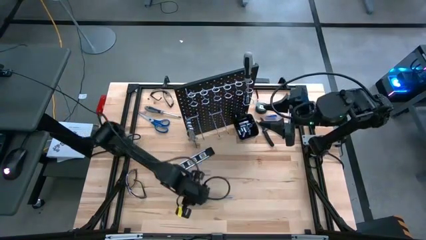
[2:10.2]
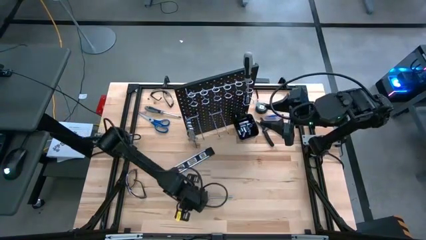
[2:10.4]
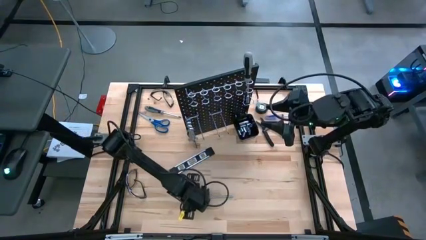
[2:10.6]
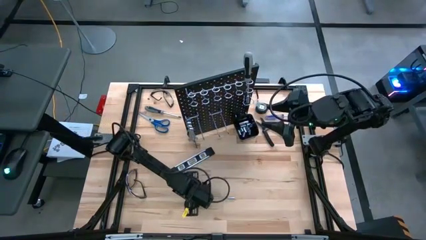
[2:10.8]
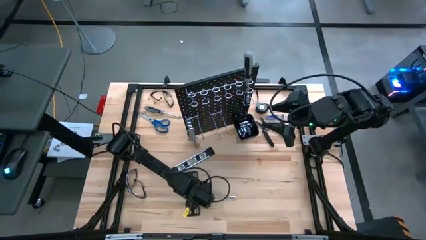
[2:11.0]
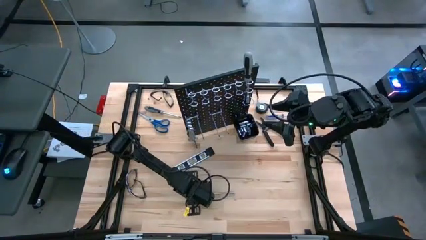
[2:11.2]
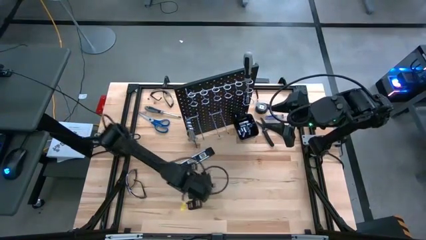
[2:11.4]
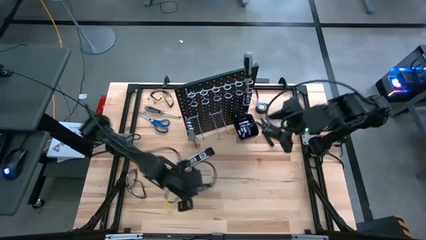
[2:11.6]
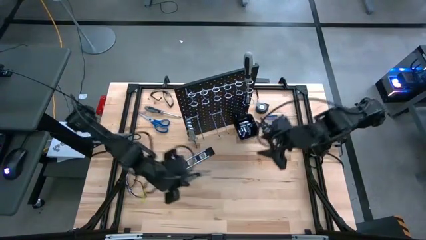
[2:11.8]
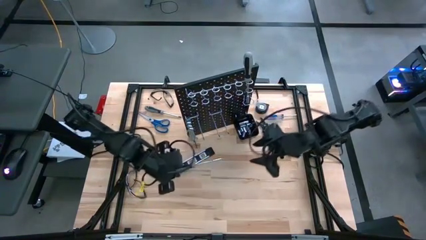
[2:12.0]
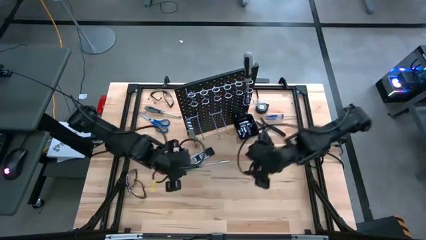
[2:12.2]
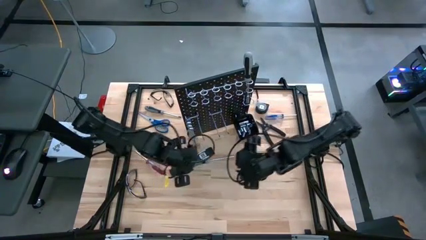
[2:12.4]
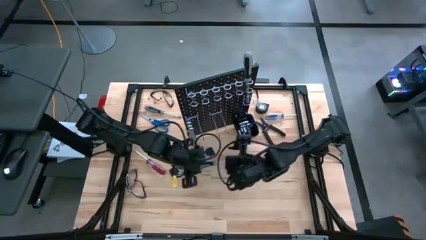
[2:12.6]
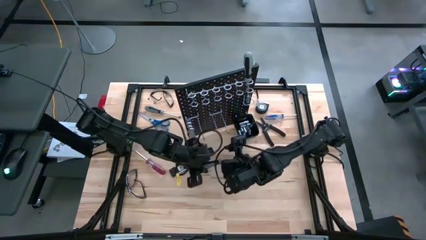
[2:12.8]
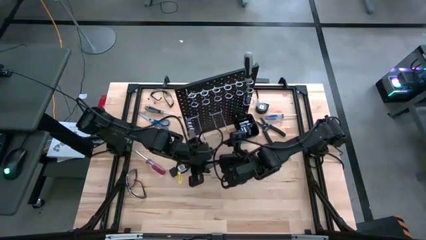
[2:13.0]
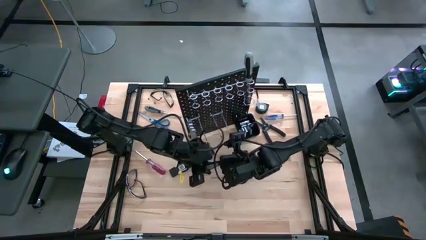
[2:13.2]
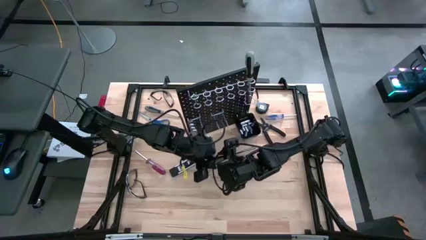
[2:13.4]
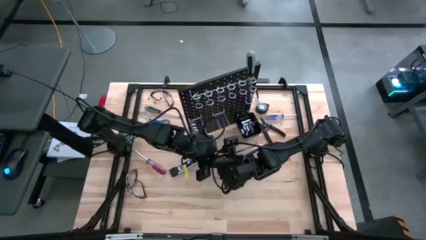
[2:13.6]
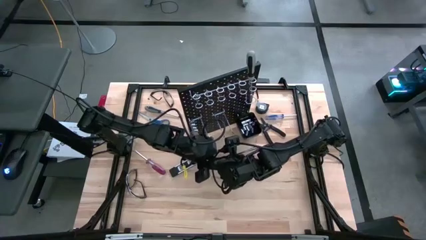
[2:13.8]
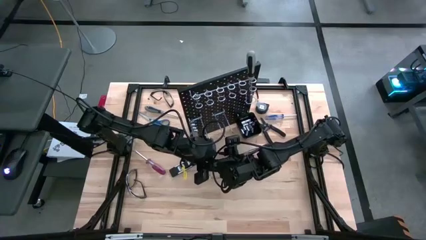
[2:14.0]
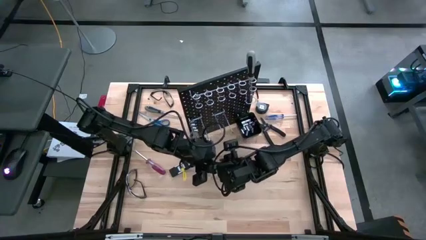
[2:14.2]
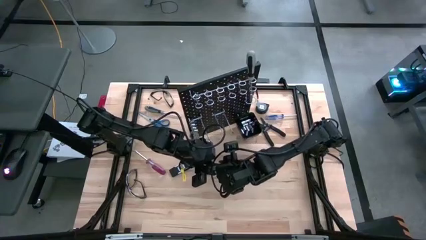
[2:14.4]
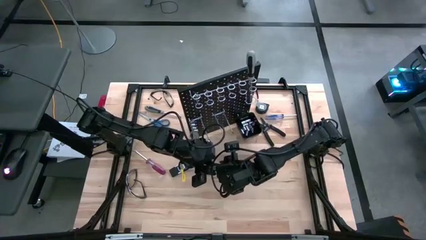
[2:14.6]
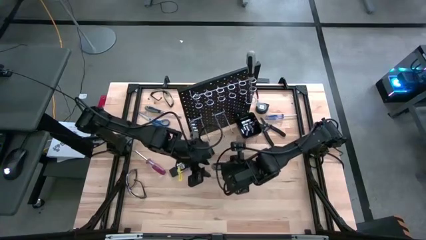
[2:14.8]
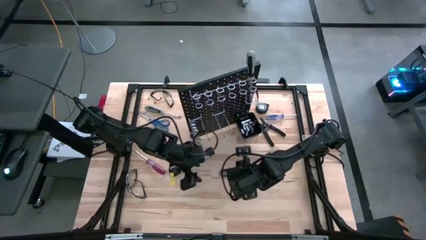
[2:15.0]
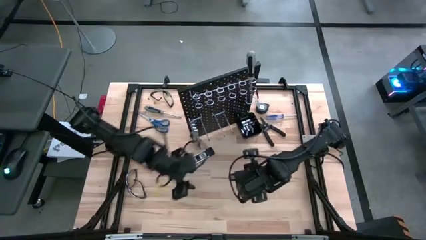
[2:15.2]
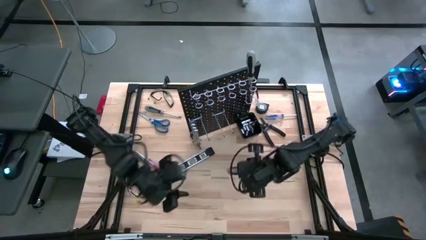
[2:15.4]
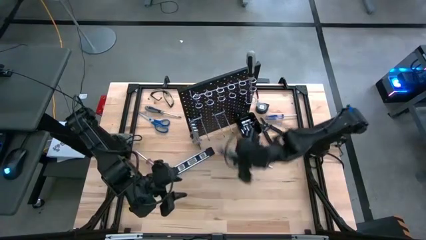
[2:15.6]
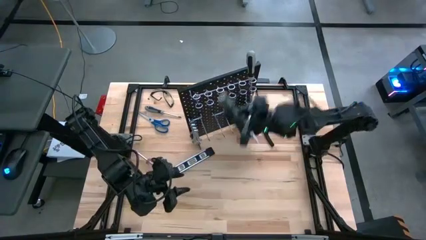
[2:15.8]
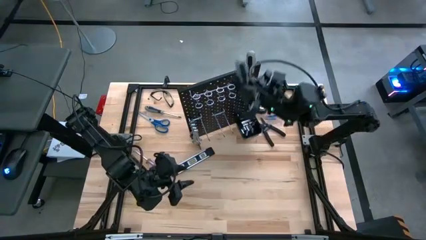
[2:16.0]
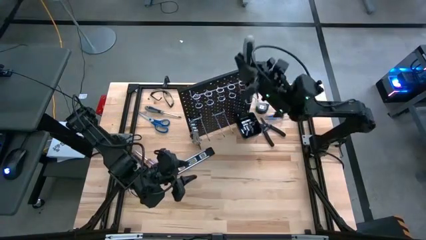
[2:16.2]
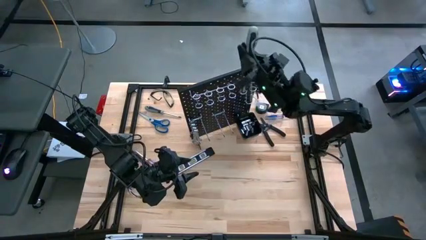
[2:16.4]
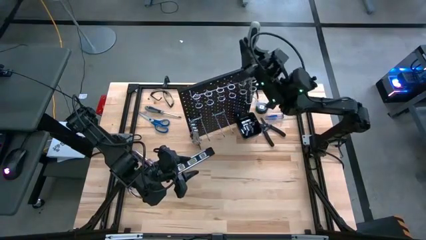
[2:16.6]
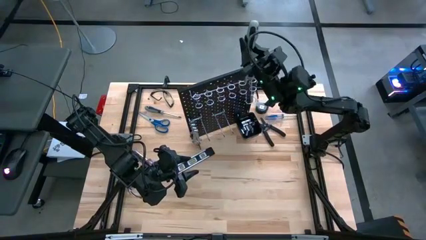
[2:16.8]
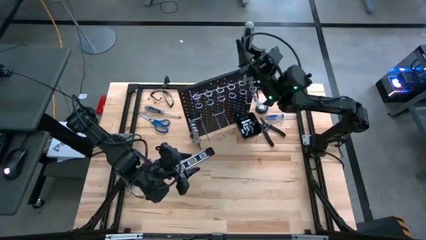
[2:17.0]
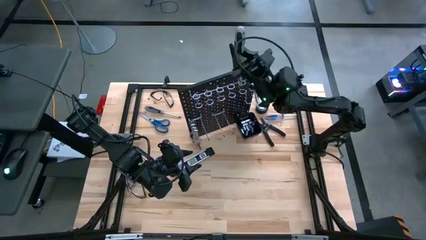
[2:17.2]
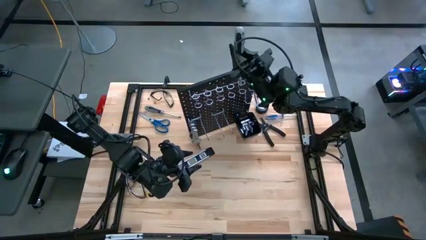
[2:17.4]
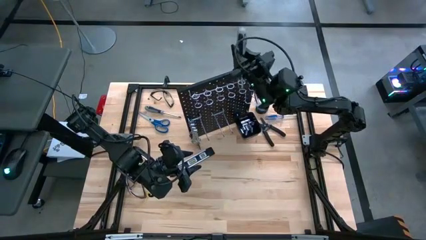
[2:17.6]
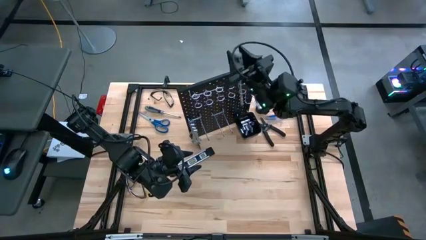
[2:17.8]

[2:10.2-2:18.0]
Task: Hang tools onto peg board
Hang the gray screwdriver on the pegboard

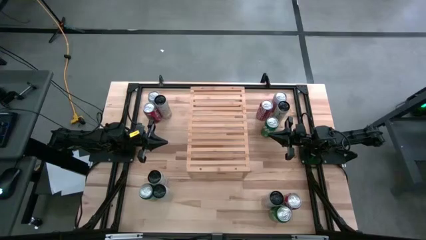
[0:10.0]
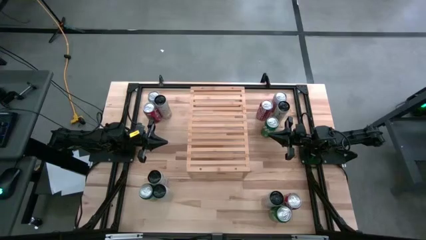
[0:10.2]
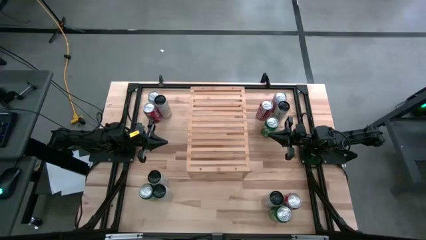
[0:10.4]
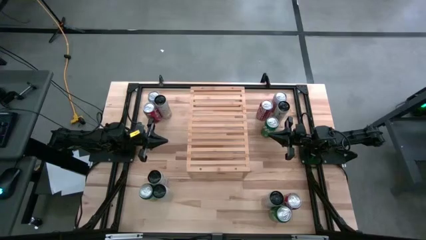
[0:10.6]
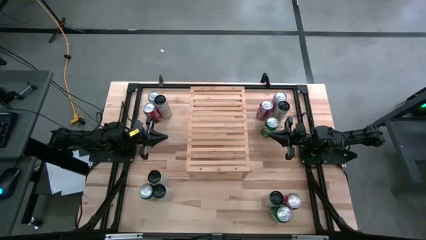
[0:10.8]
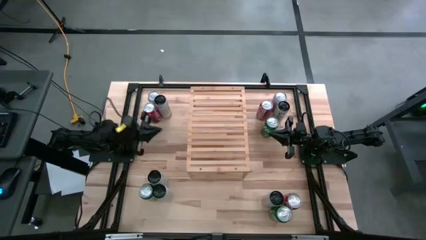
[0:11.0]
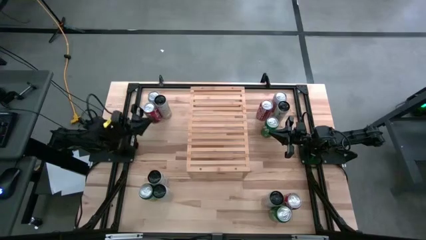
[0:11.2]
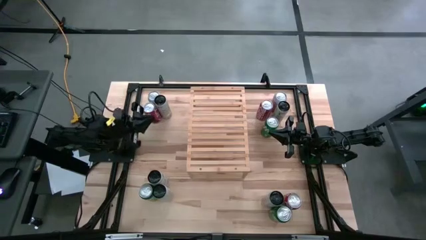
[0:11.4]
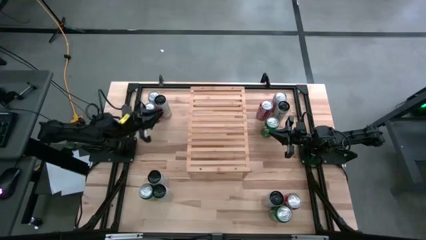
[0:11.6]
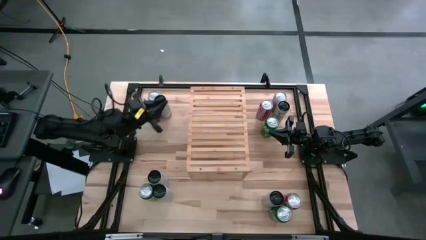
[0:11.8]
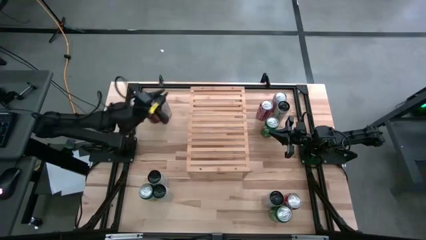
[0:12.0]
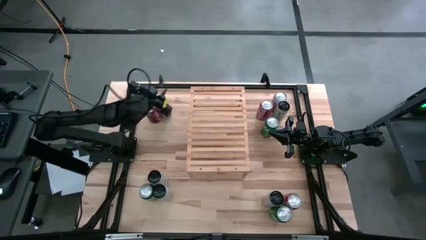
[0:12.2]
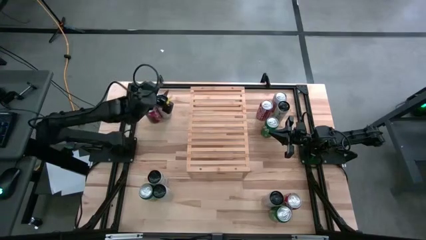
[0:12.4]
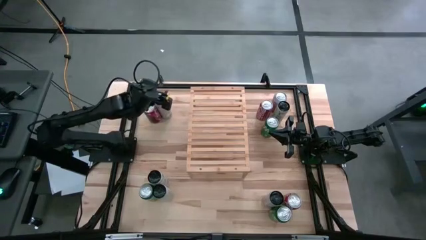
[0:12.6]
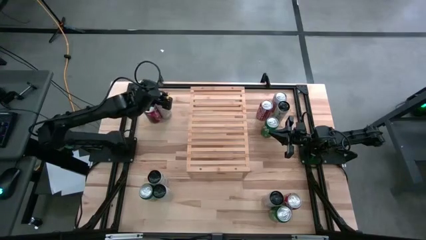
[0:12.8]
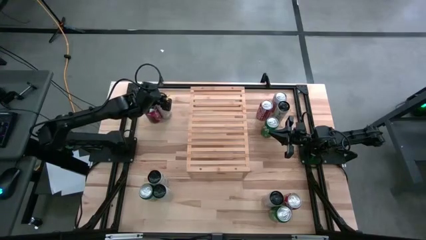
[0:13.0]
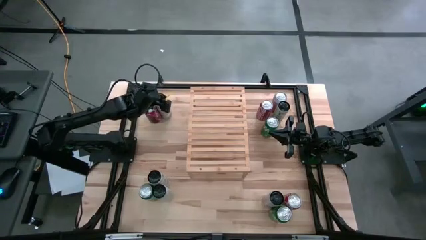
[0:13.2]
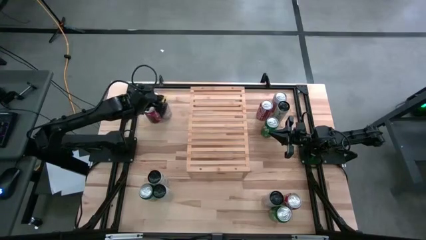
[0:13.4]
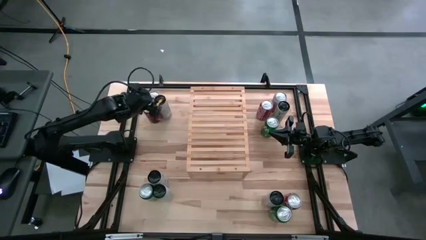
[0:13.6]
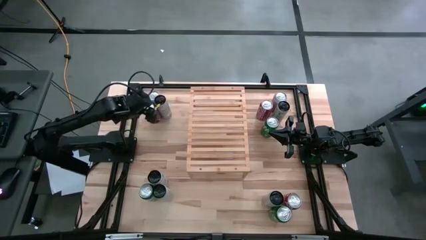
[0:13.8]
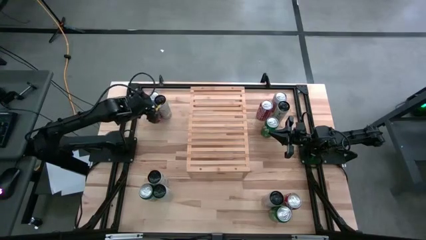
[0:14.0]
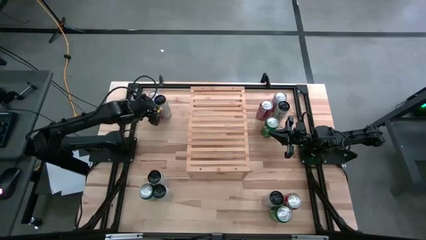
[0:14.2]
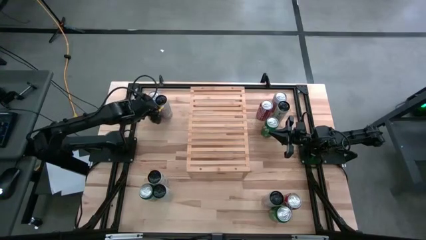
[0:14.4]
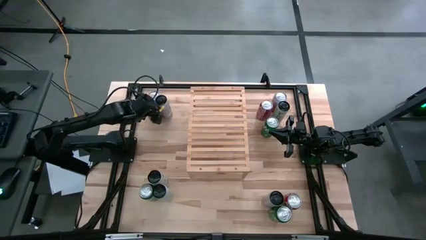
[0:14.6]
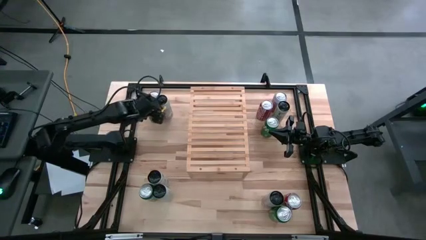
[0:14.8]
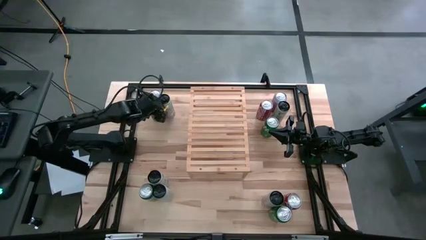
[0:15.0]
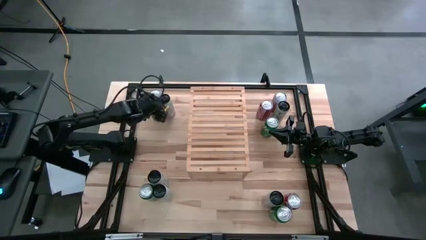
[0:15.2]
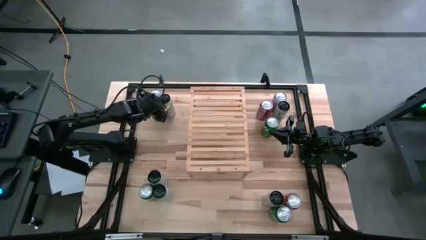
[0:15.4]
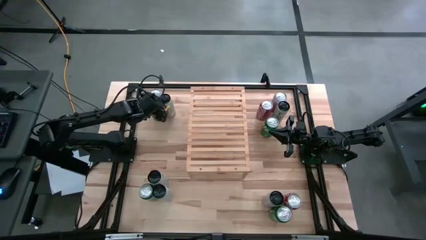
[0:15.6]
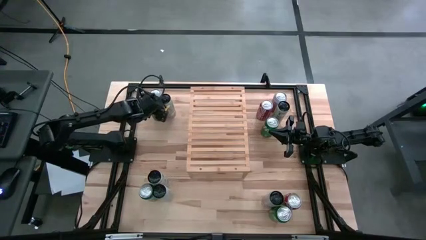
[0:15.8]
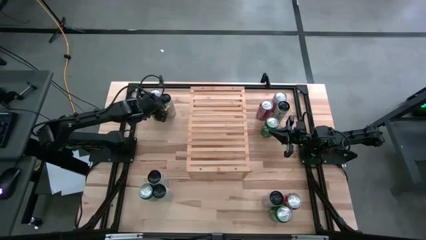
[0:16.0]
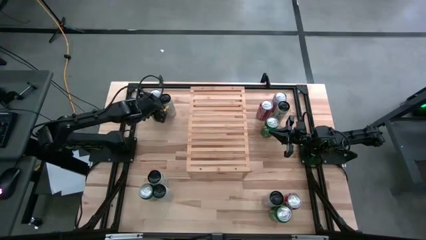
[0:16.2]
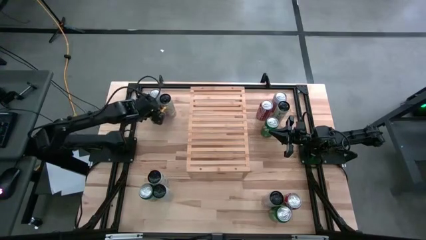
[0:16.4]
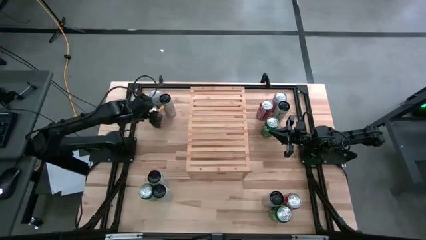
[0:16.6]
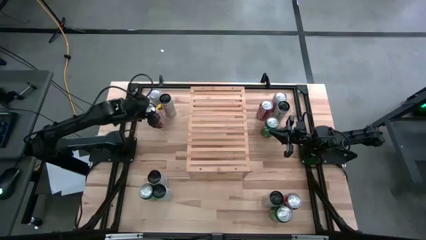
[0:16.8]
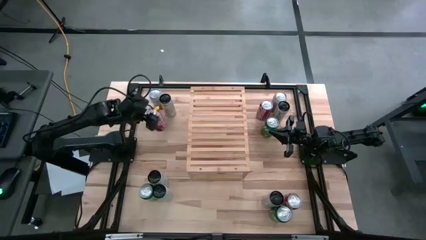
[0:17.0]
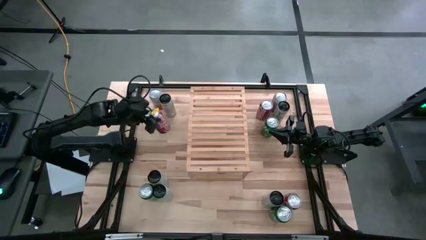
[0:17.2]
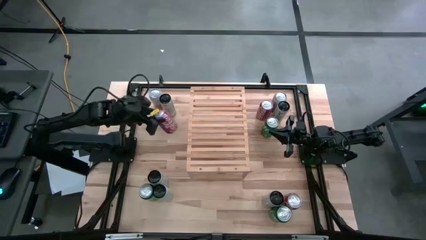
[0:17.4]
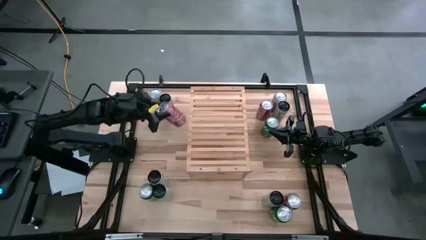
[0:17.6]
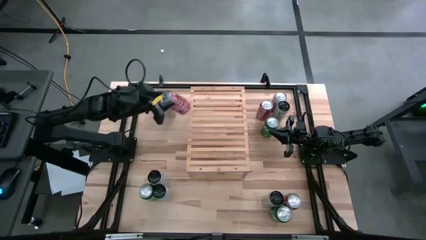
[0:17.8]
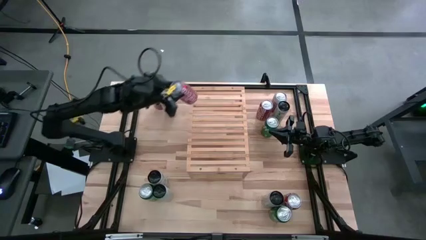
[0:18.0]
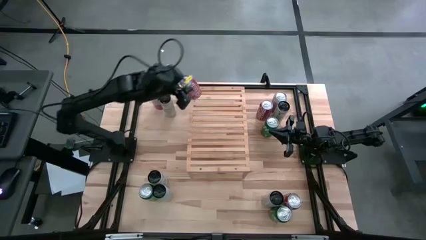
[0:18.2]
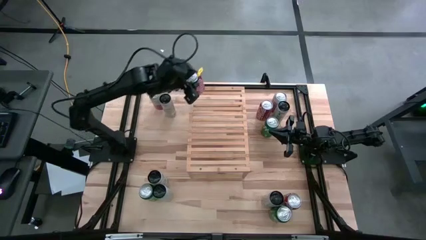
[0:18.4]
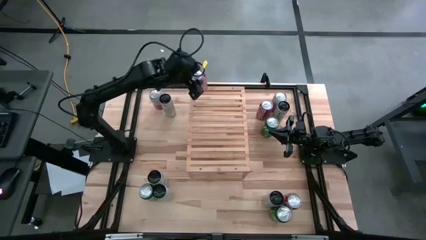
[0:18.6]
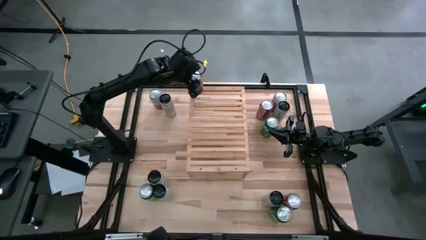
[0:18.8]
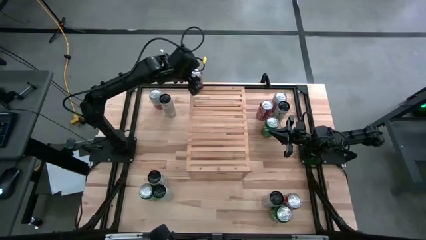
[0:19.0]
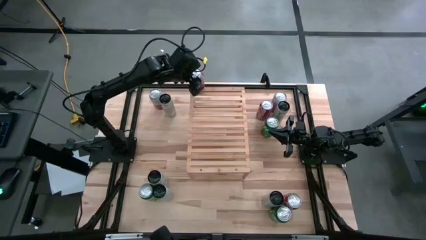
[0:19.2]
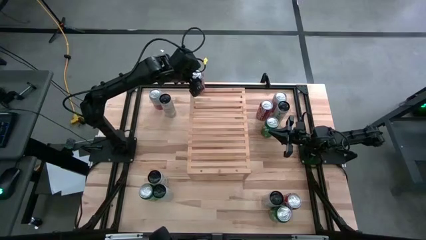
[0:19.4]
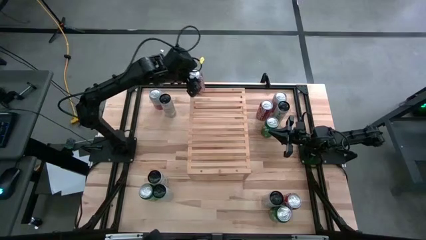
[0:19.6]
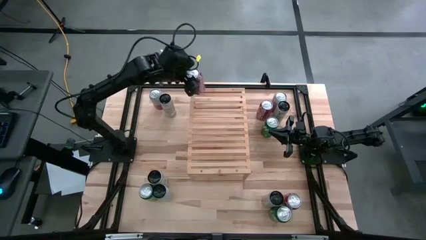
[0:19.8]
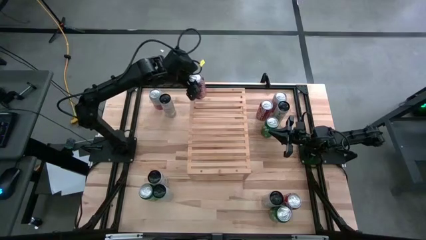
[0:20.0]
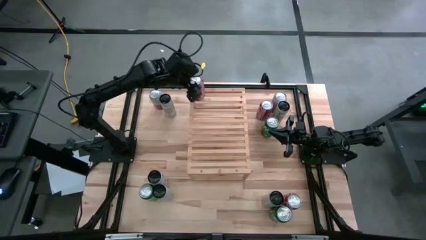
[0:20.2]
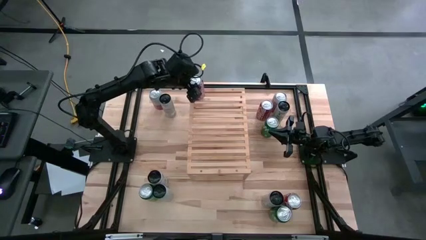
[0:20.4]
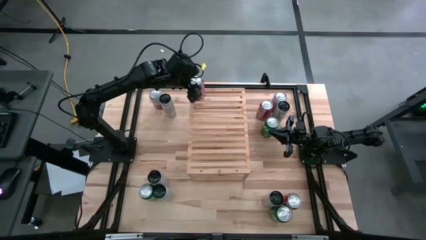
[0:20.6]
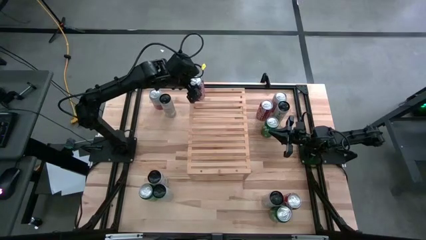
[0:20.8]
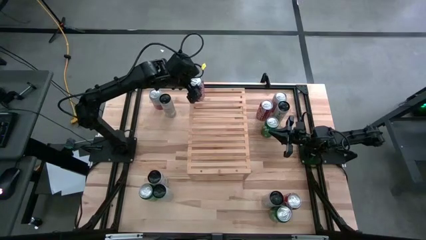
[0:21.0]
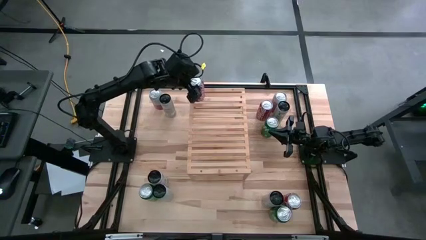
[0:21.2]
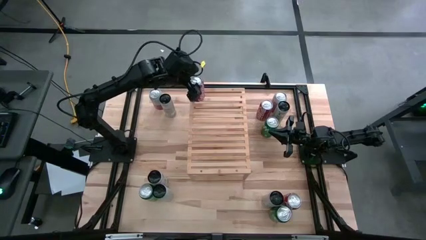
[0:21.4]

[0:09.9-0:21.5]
Task: Place canned beverage on shelf
Put the top left coke soda can on the shelf
